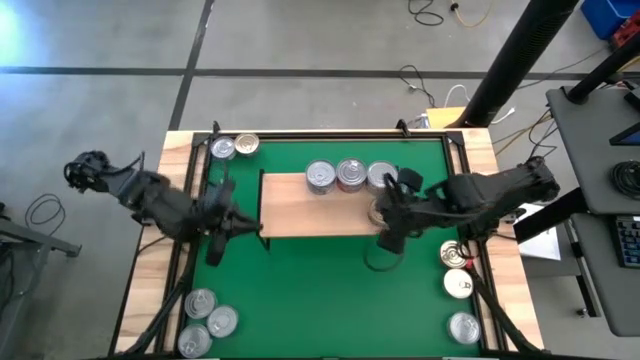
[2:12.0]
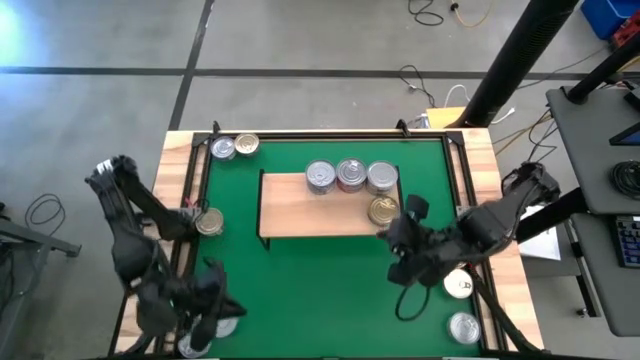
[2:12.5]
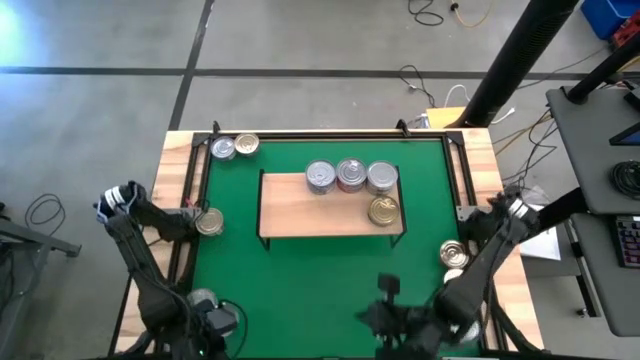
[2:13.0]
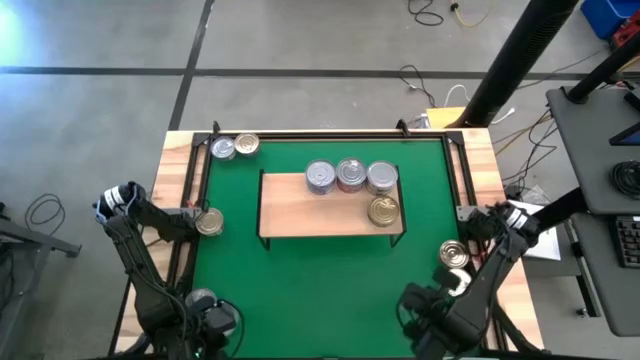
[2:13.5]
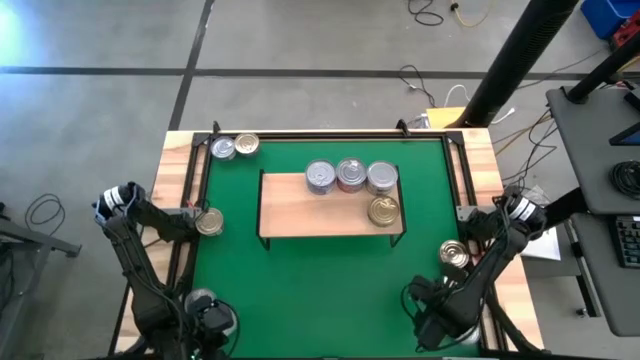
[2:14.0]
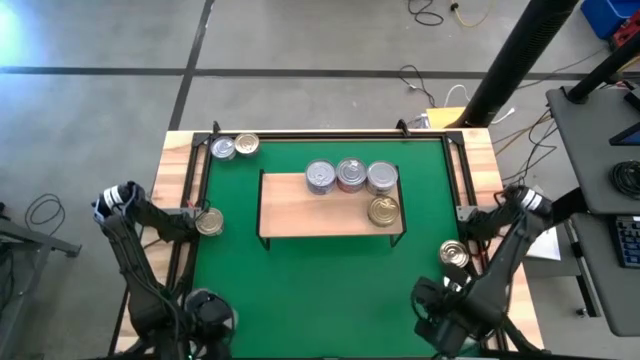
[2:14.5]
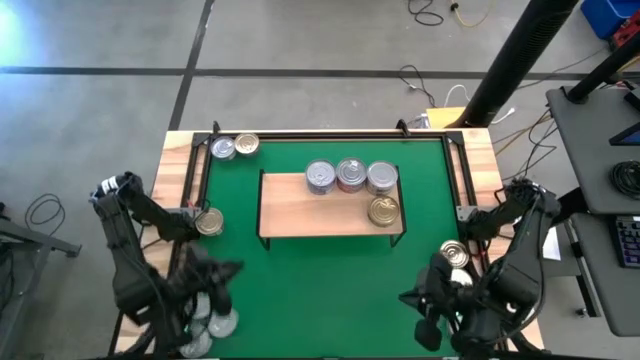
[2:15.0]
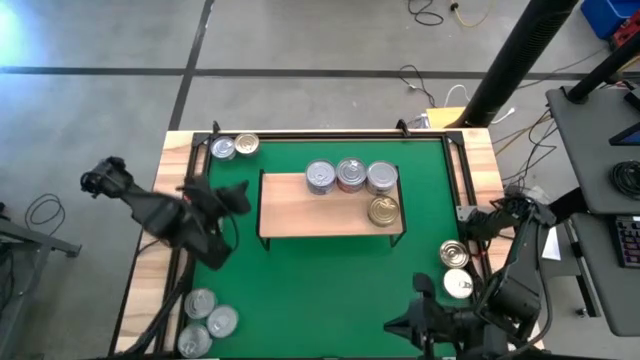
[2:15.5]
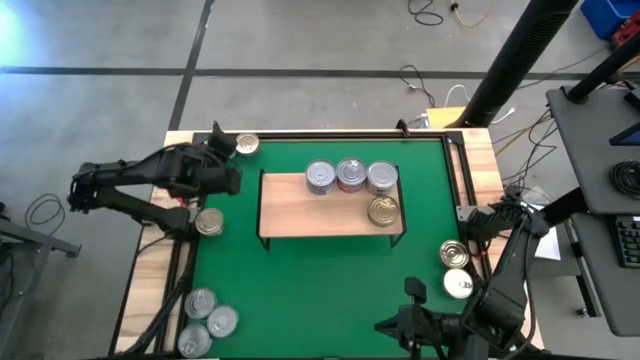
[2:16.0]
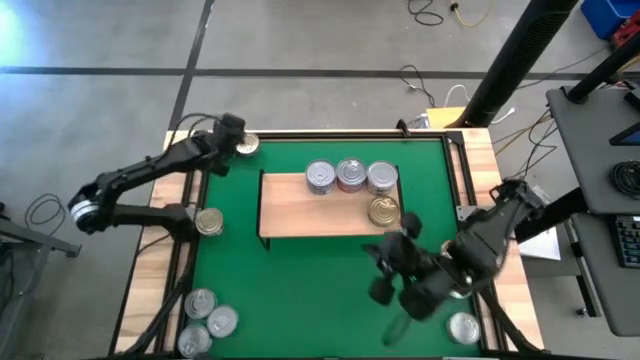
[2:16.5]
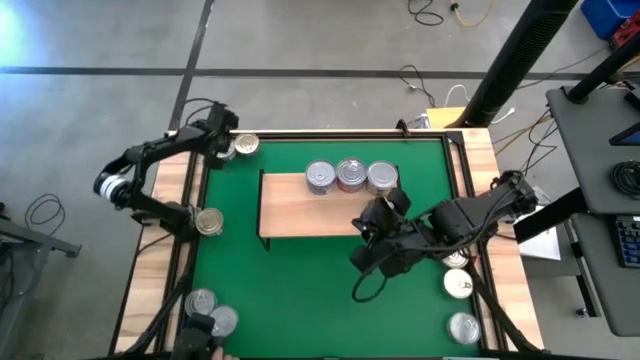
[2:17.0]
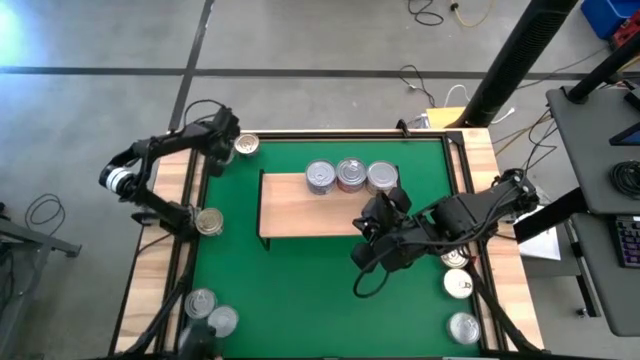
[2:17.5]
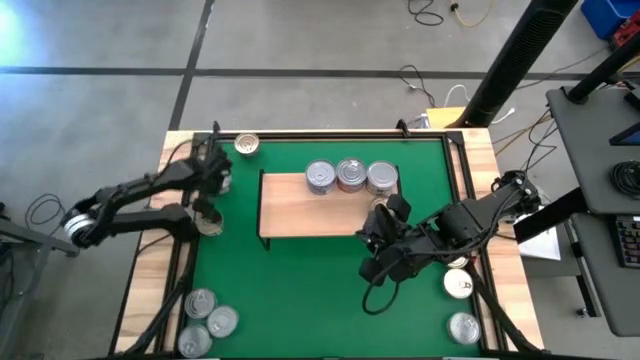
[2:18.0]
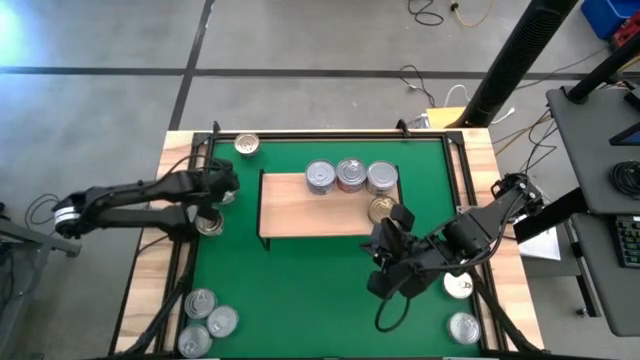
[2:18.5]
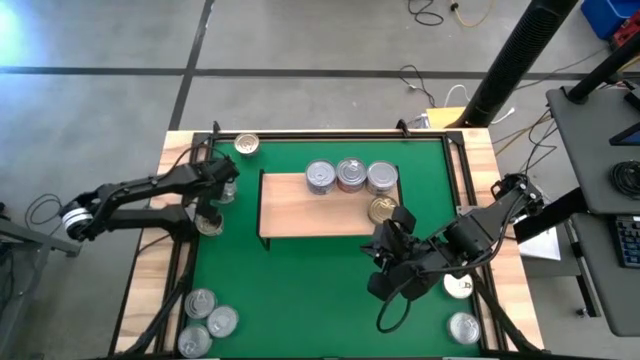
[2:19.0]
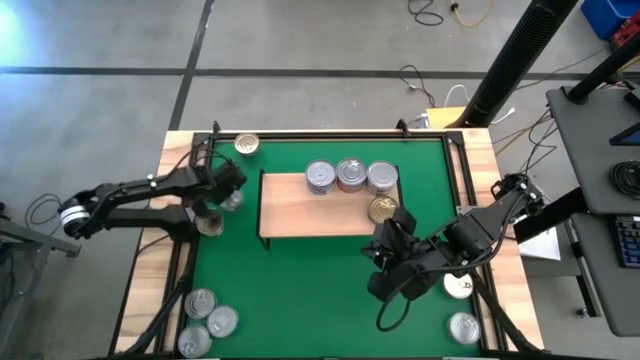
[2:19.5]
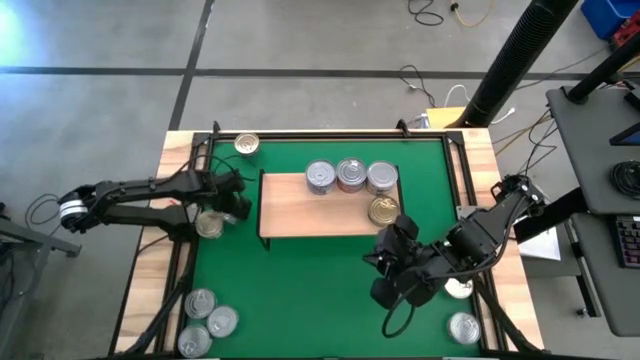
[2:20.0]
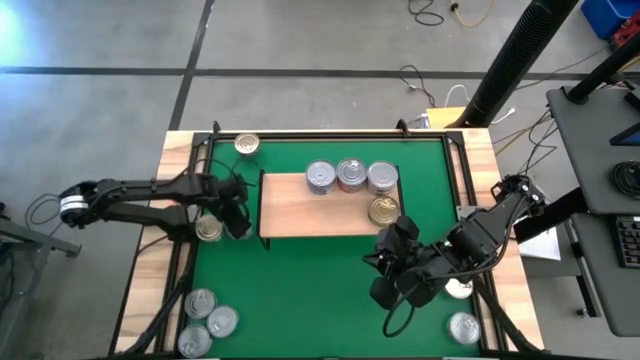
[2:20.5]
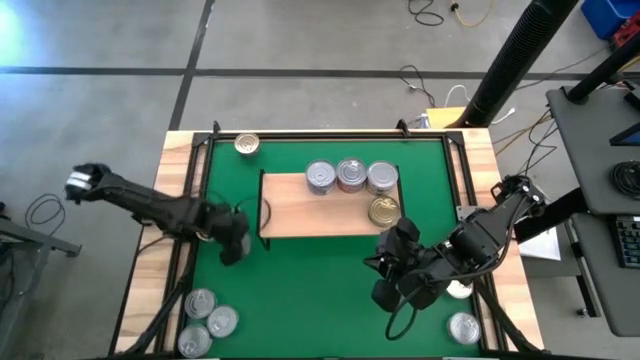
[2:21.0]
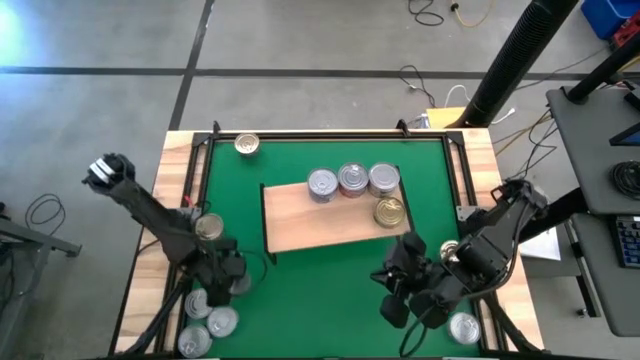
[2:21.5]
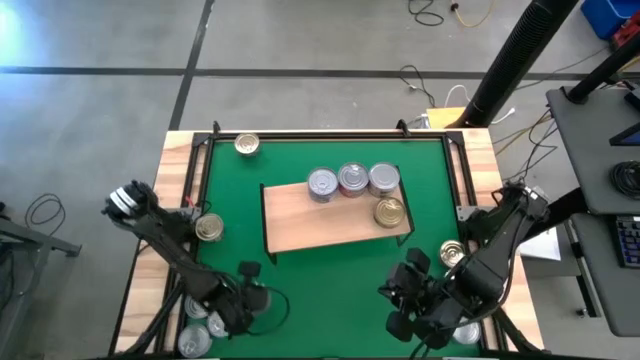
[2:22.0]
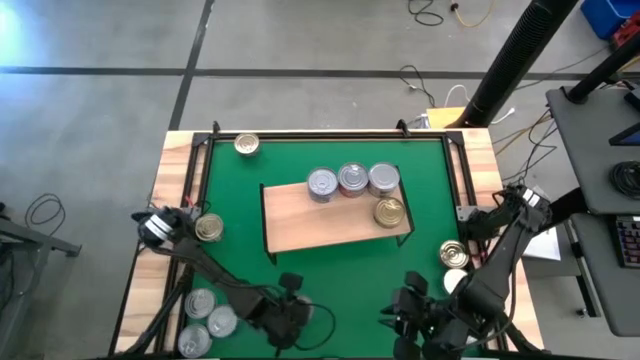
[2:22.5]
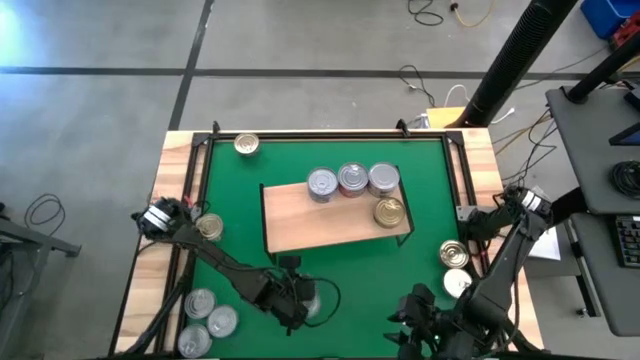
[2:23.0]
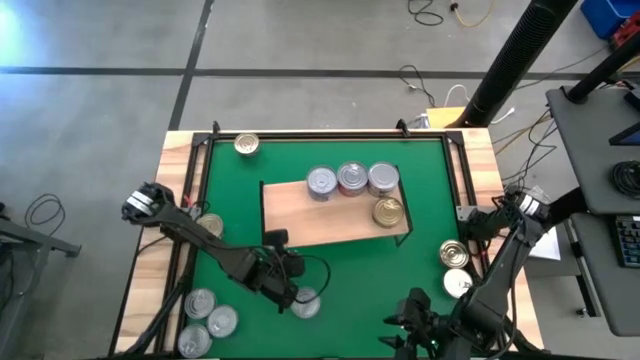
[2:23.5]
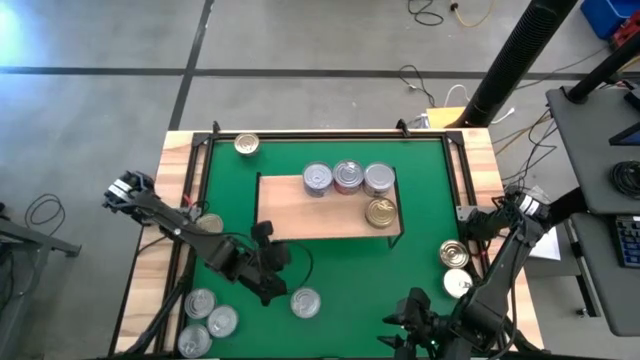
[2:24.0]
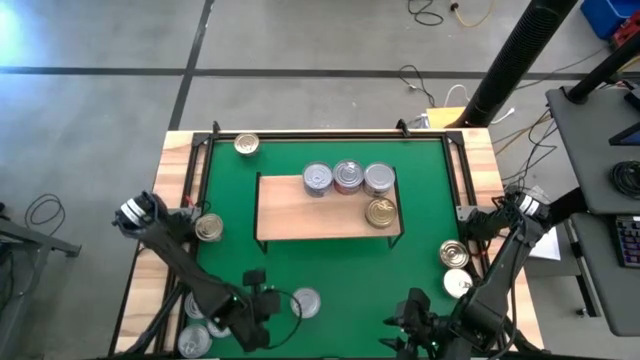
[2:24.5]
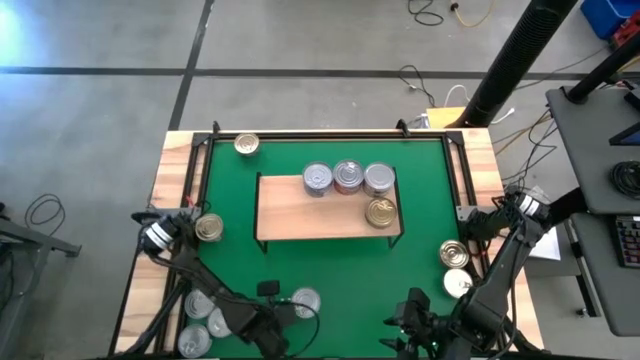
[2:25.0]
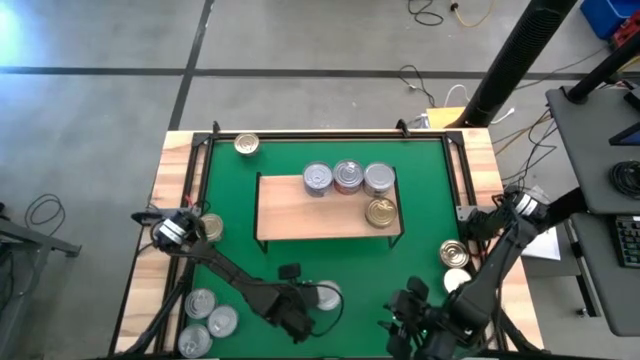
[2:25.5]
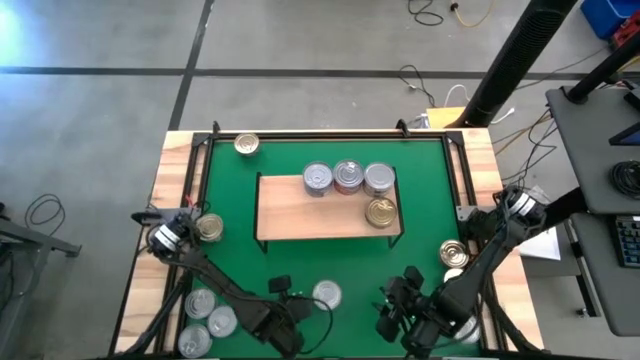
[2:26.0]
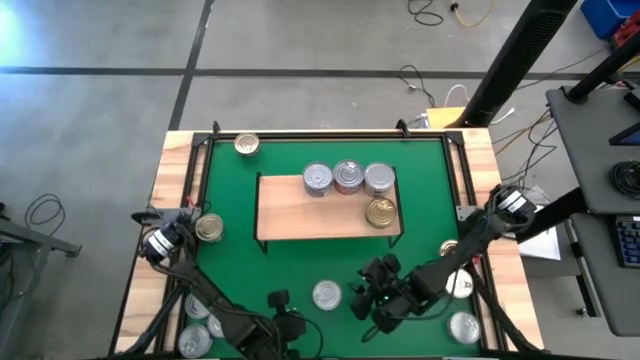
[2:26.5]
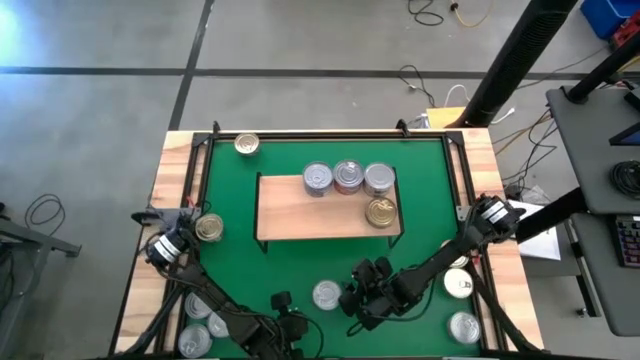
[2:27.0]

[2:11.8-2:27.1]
Task: Stack canned seafood by type on shelf
Stack the green tuna can on top of the green tuna can on the shelf
